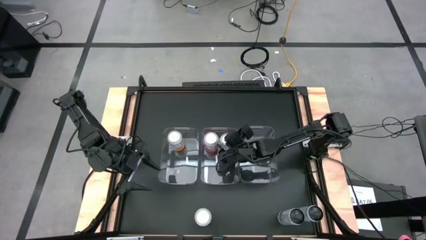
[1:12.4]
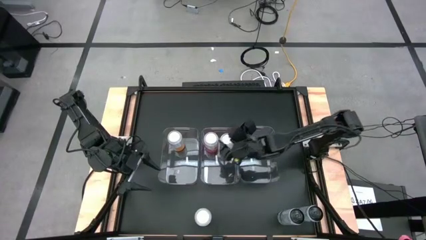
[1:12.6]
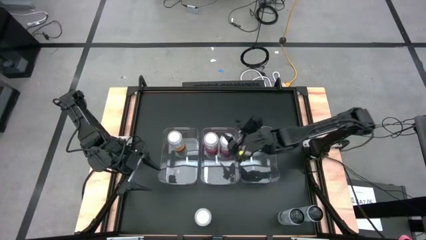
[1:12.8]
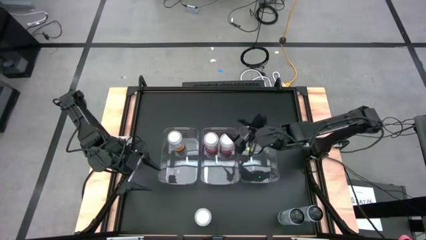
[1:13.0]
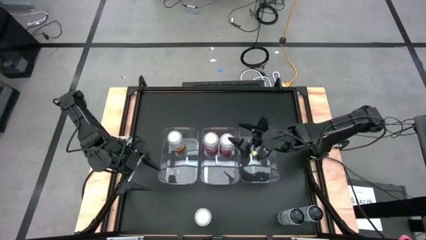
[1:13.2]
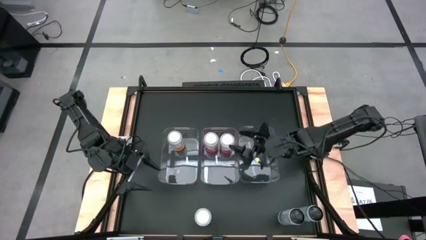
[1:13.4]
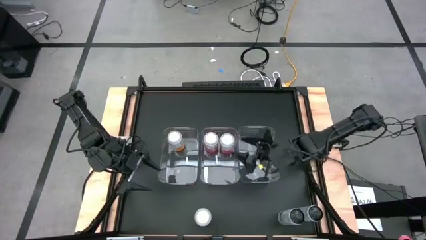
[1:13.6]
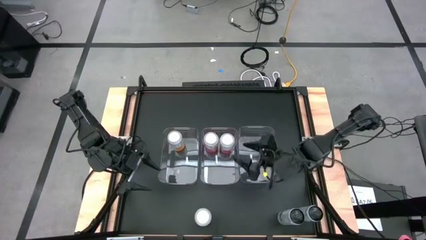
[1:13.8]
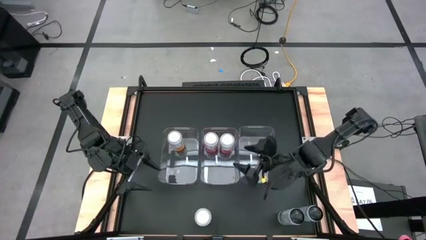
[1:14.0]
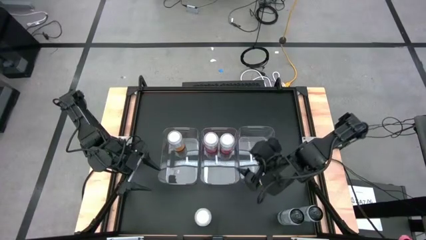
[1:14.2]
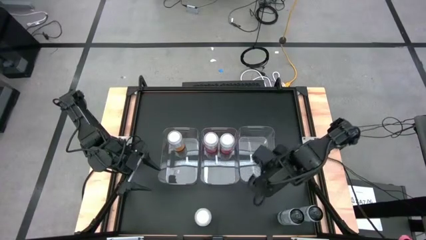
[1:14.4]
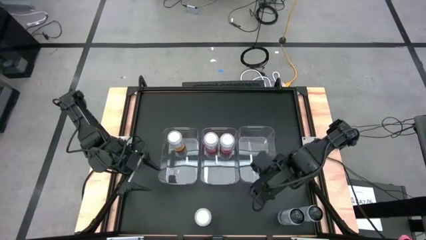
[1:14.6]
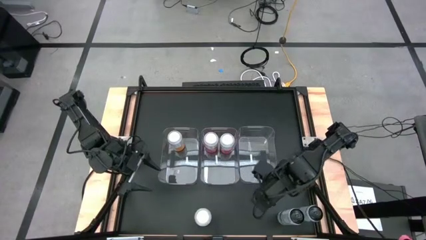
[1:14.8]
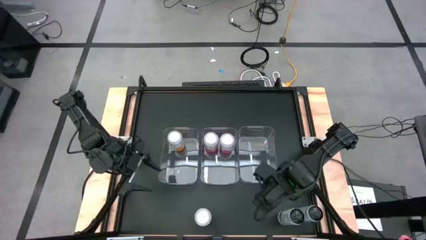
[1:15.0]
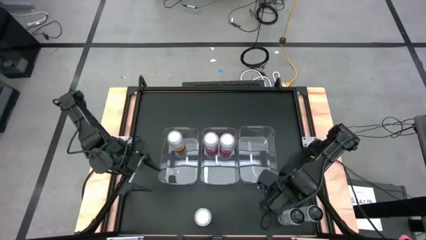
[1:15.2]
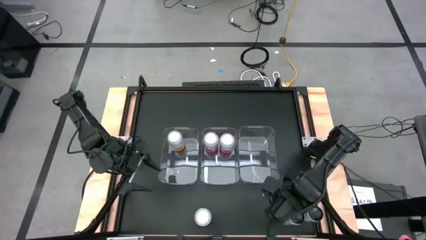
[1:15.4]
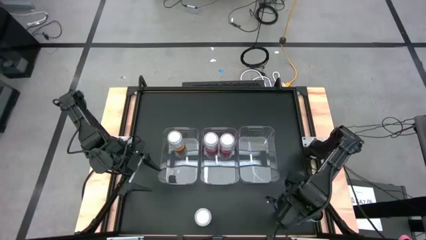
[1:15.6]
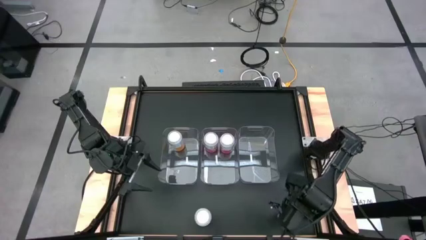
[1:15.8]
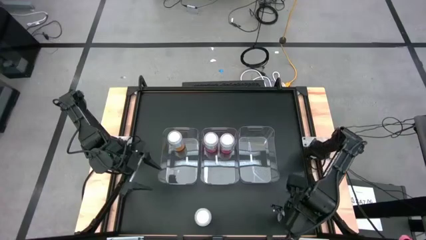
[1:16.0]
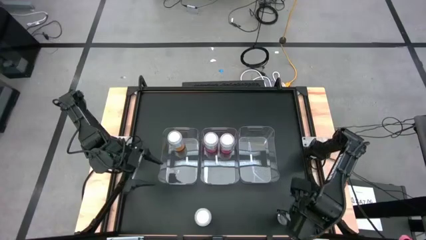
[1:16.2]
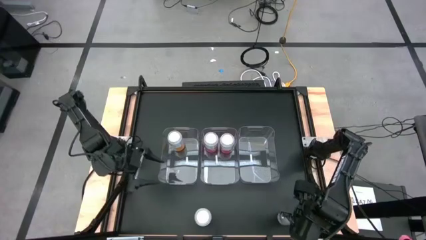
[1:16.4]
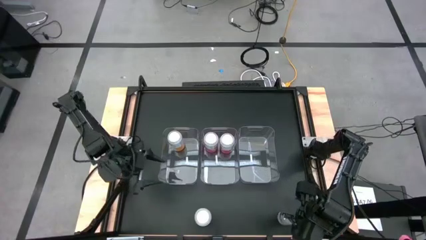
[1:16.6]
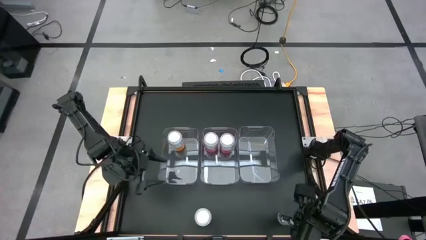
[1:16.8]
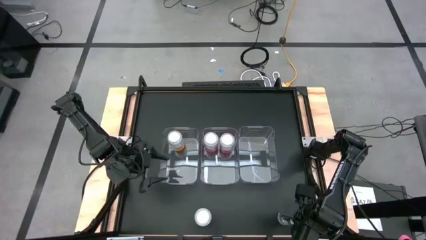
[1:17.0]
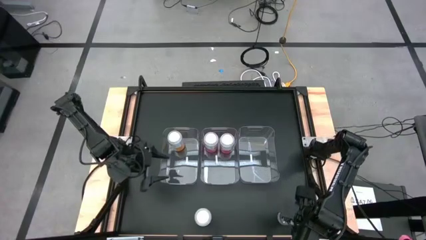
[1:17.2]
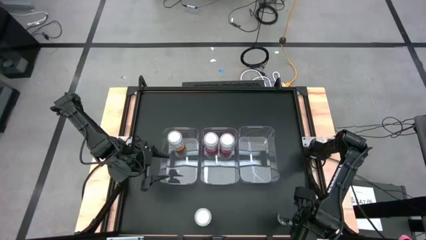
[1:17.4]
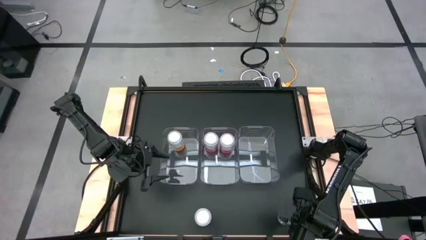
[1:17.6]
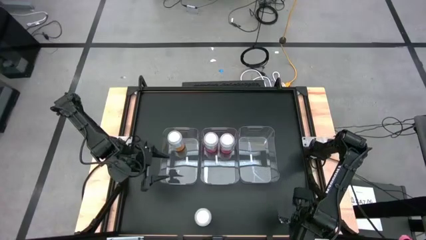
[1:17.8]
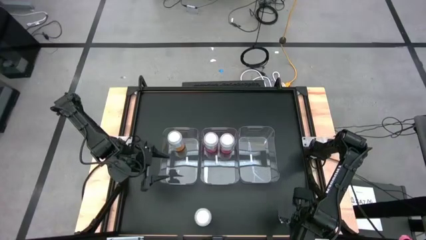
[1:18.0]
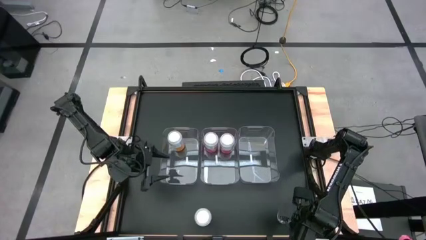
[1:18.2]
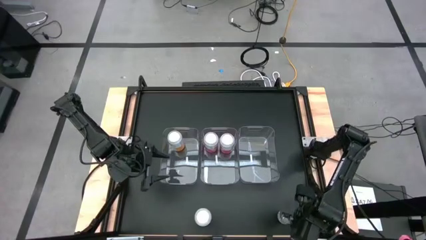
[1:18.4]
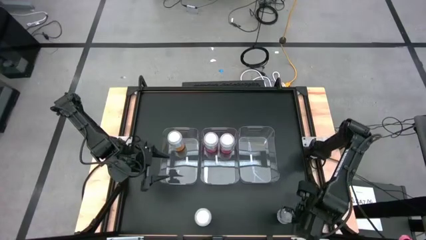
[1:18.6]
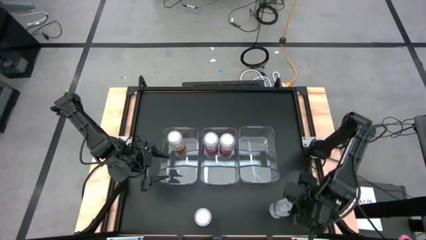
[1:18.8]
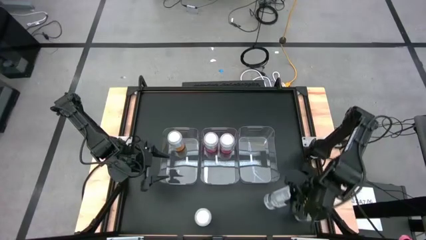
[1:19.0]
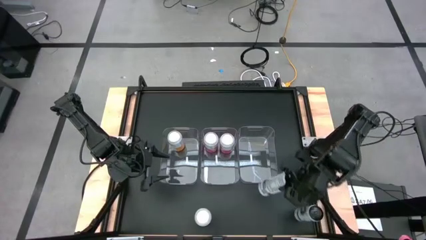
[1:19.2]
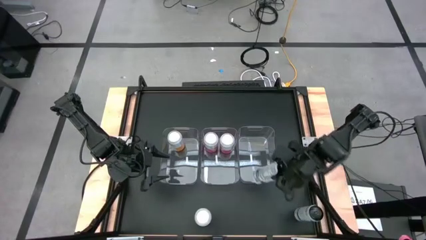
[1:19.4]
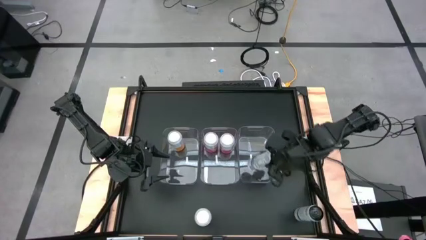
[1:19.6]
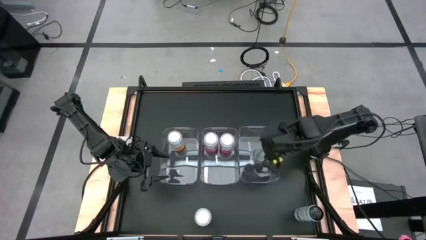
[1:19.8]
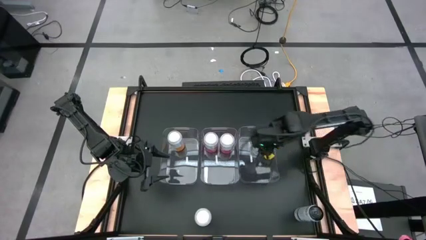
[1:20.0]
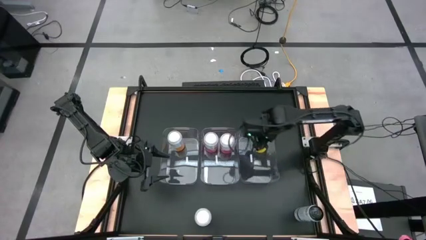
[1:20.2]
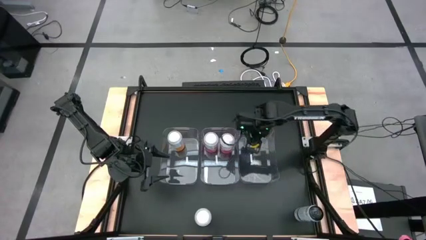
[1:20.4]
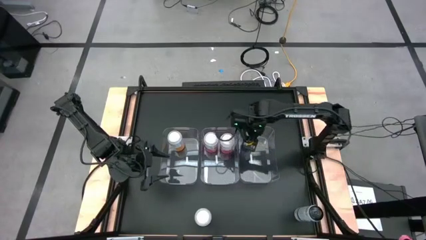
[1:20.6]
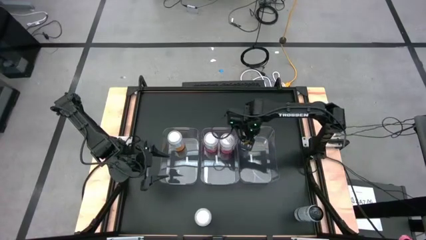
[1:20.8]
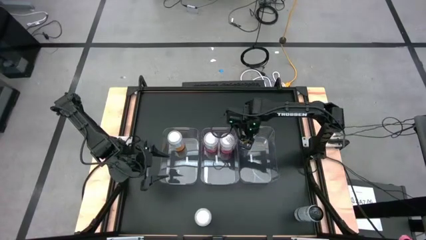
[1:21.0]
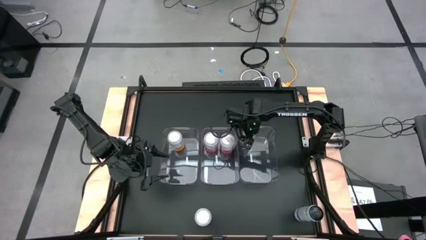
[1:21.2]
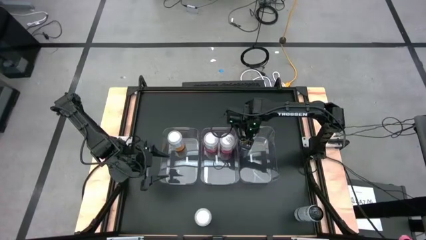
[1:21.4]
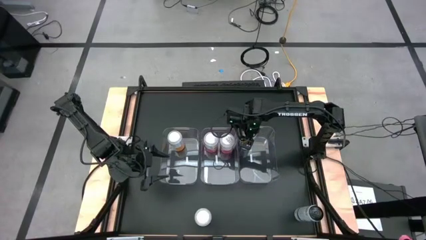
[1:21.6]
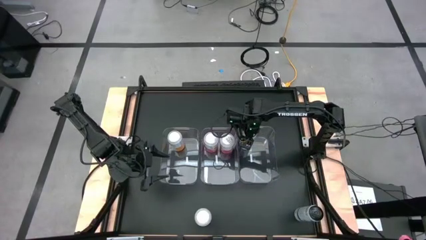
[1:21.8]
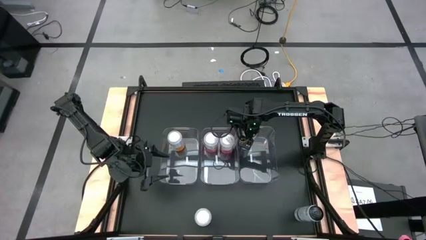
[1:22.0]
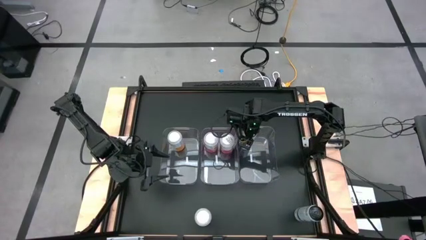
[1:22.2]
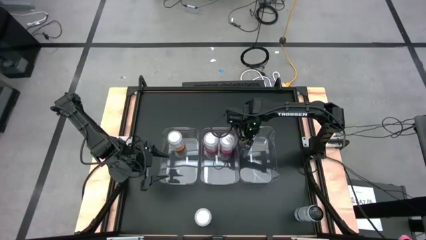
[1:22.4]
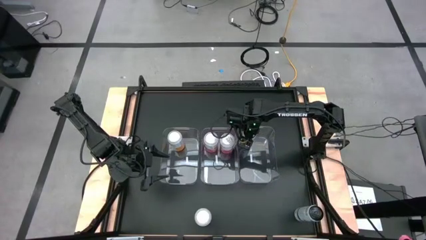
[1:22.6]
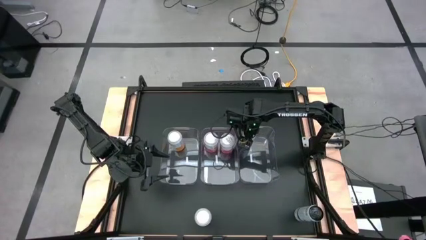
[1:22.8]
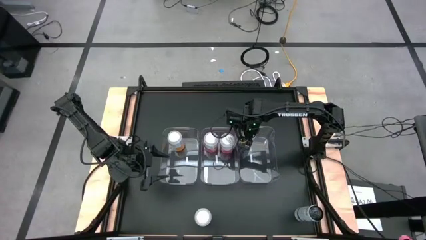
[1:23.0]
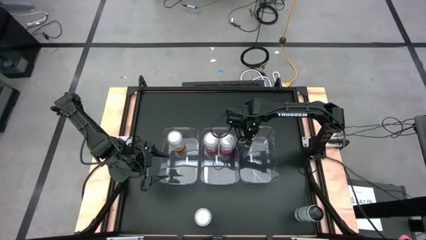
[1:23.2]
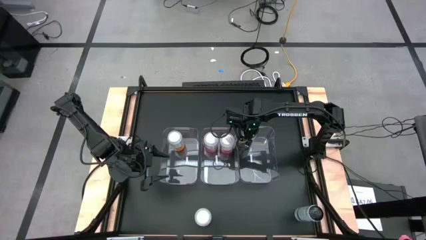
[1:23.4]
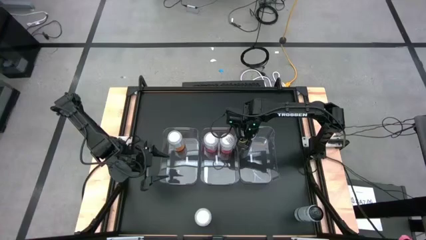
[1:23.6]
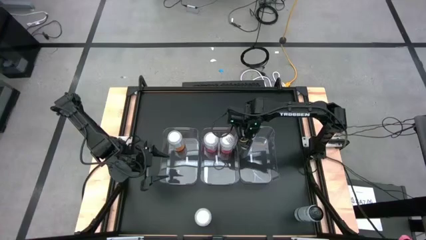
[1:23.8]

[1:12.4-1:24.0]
Task: Sort soda cans
Put the left blue soda can into the right transparent bin
